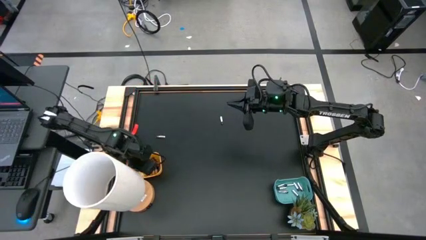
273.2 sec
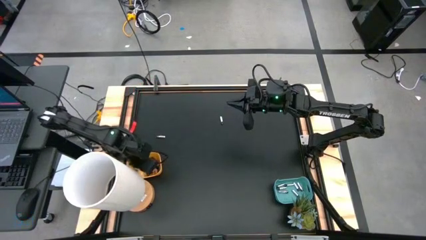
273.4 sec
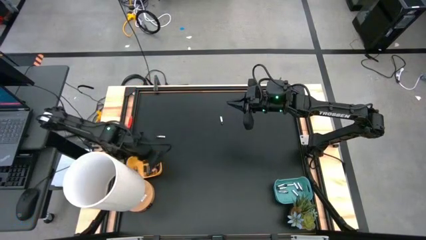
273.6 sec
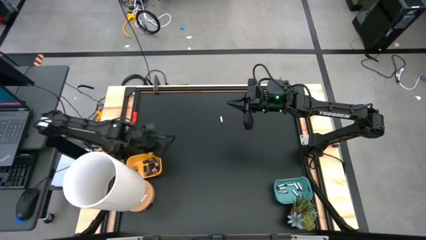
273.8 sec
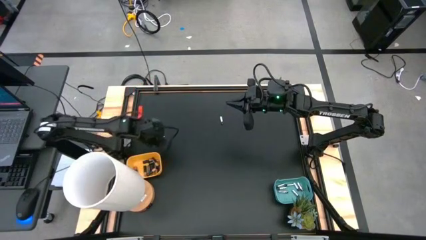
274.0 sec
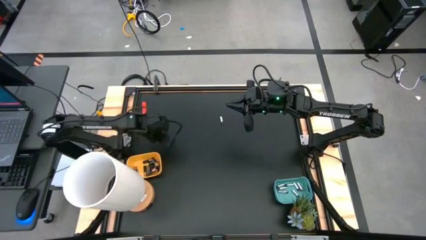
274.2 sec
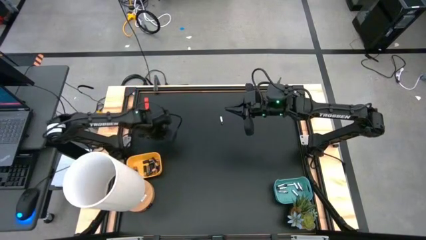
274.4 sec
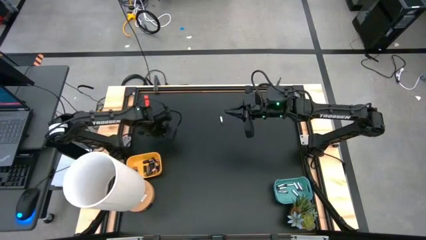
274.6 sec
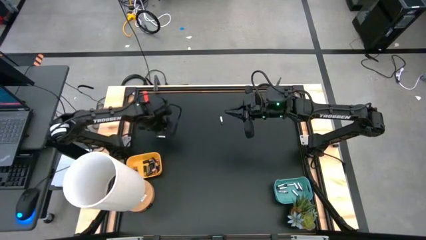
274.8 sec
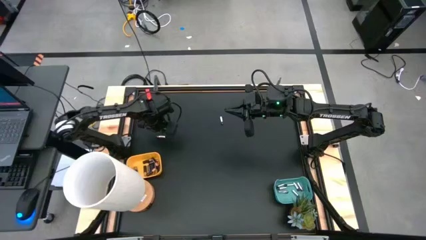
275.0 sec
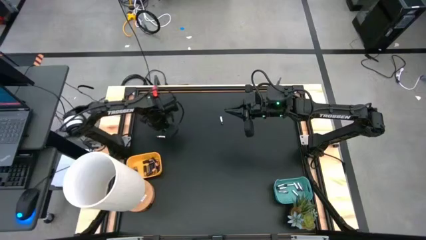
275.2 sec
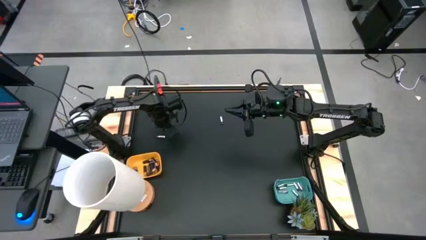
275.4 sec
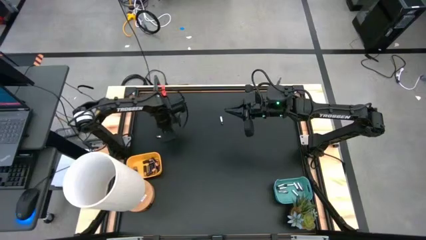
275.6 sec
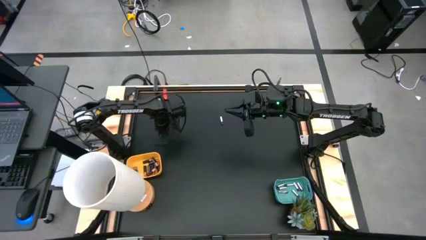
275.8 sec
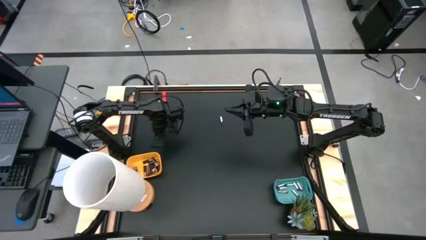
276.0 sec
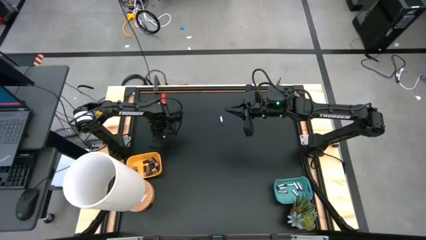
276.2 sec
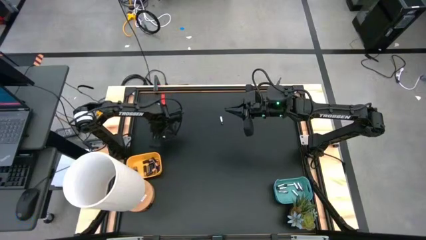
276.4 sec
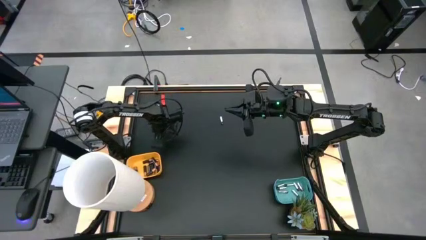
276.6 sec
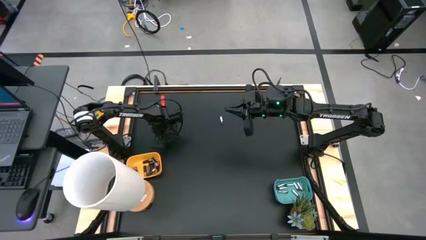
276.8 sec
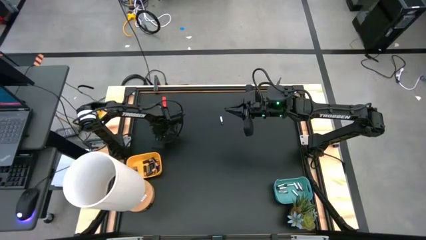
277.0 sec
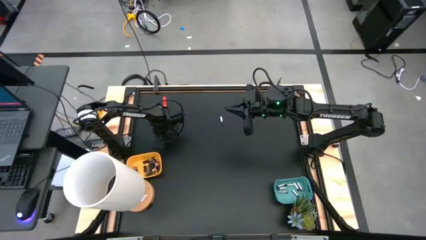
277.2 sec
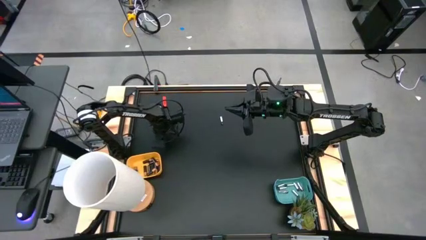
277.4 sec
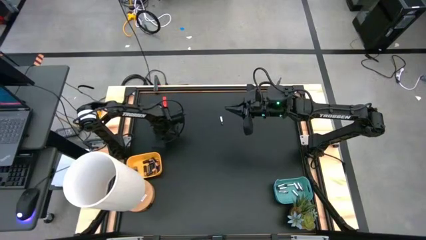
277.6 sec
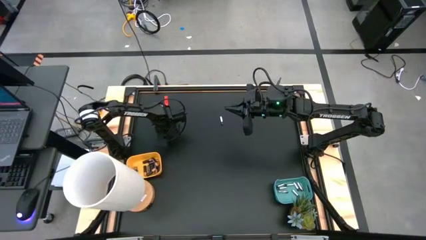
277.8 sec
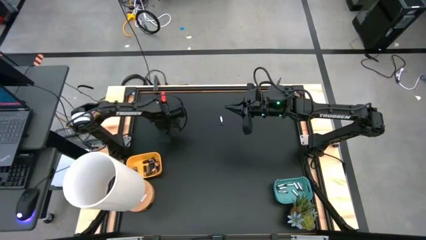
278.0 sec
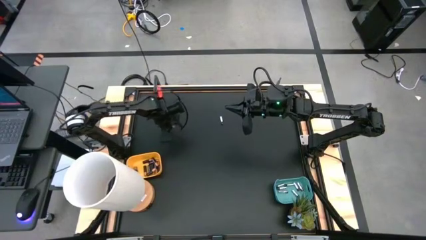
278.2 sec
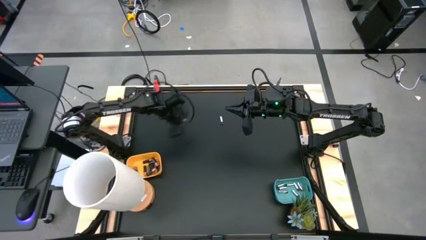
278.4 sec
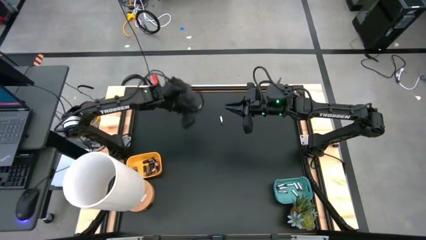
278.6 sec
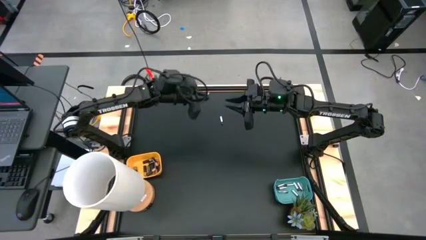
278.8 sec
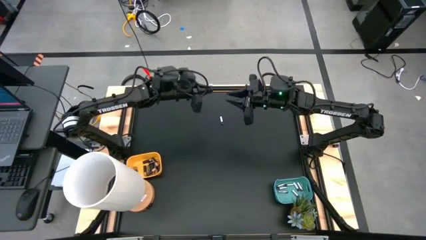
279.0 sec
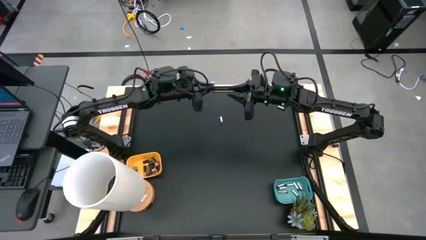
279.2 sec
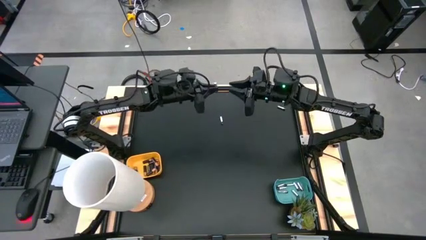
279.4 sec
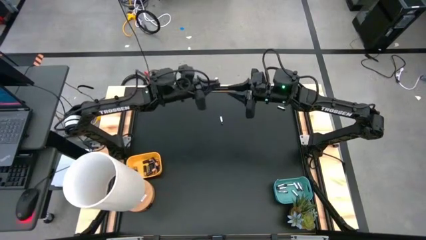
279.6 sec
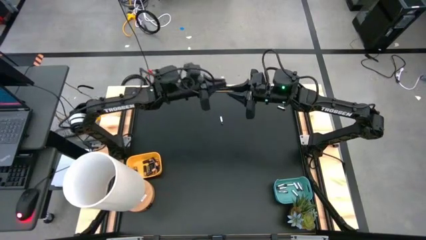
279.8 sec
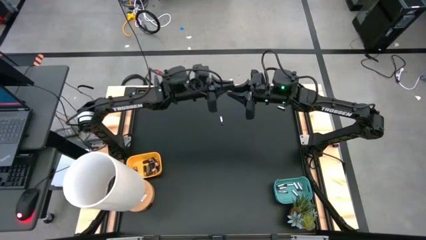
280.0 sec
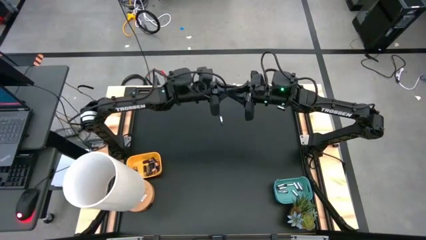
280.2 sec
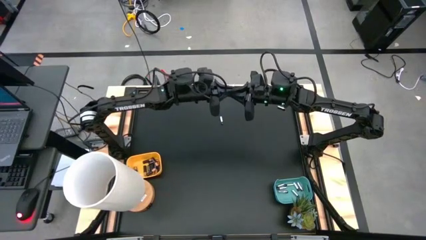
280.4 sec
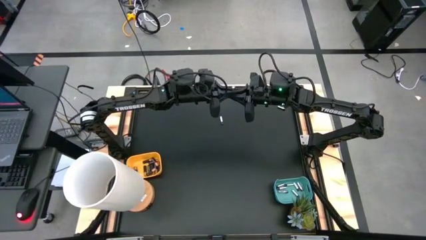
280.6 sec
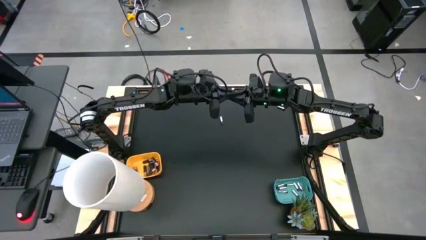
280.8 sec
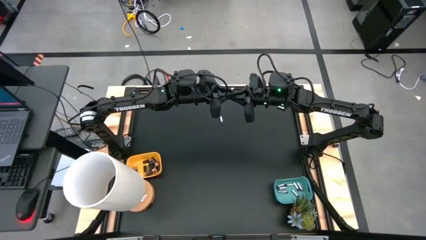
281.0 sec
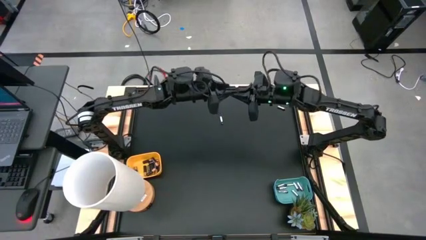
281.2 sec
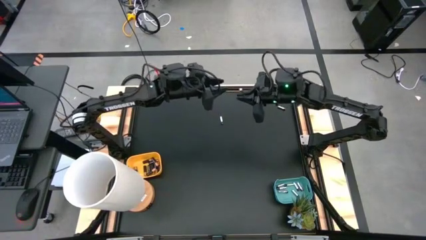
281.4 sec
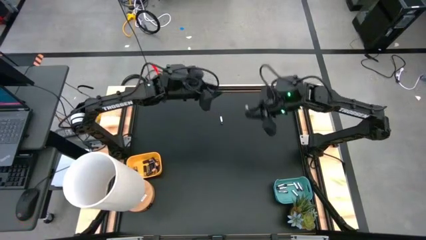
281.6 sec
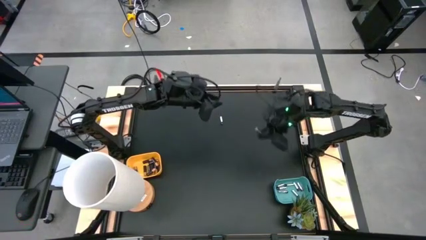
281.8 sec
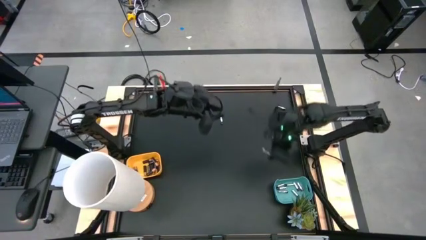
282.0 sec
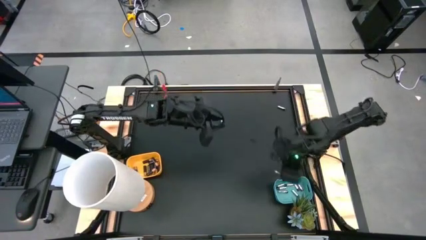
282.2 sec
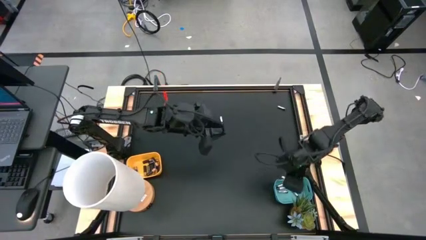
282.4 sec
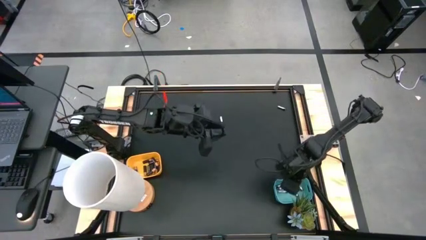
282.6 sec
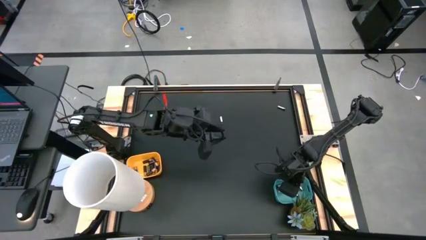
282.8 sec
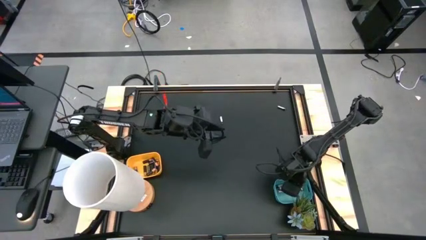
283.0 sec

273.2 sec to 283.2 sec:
Task: Sort batteries
Put the silver battery into the green bin

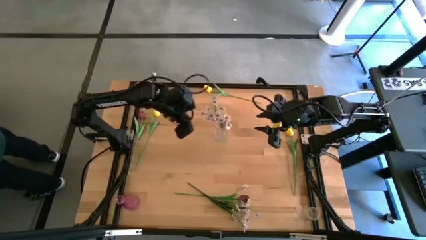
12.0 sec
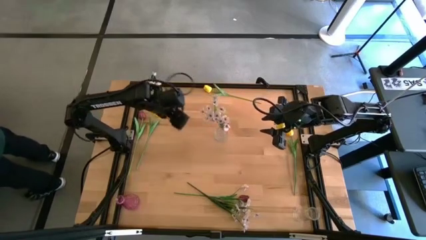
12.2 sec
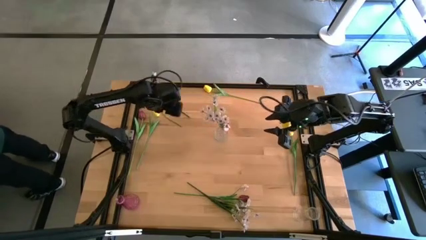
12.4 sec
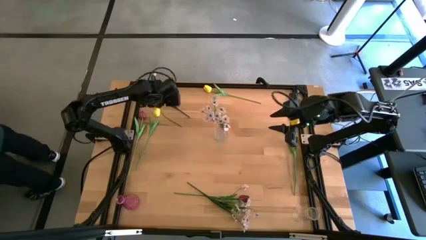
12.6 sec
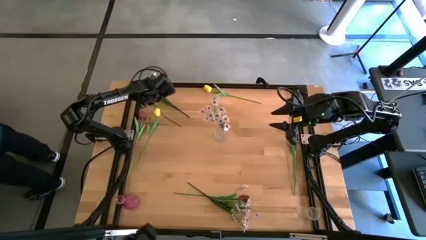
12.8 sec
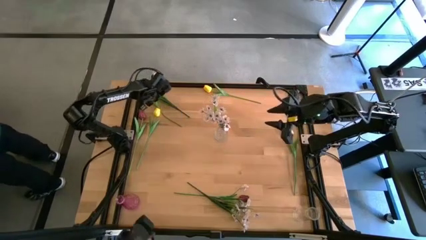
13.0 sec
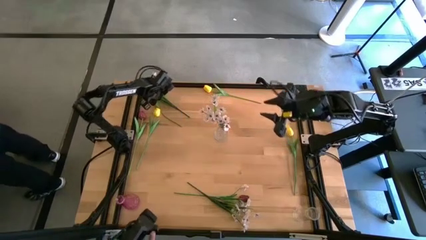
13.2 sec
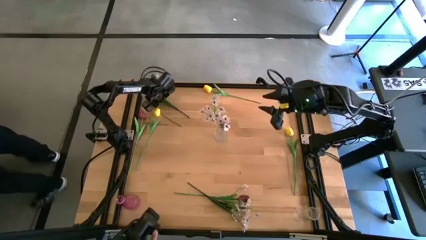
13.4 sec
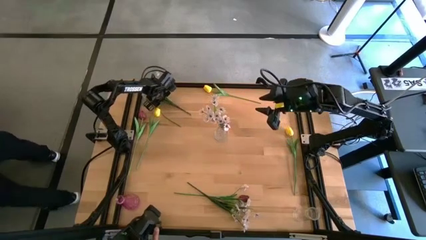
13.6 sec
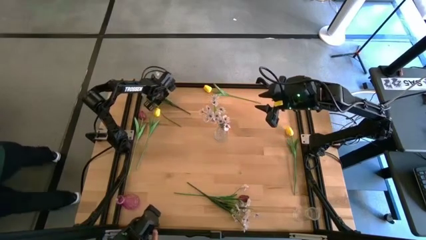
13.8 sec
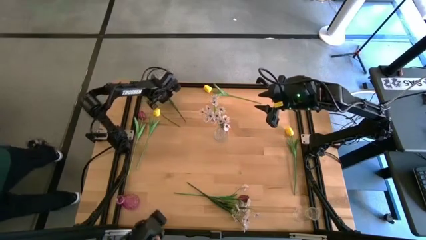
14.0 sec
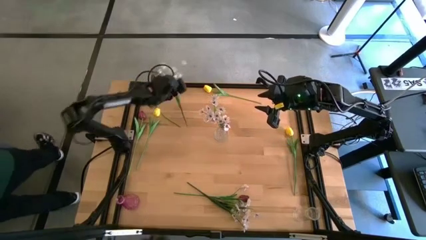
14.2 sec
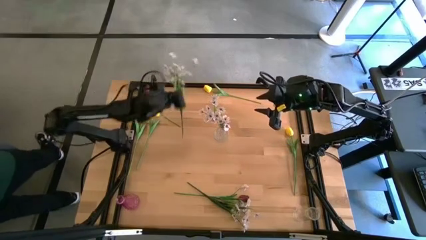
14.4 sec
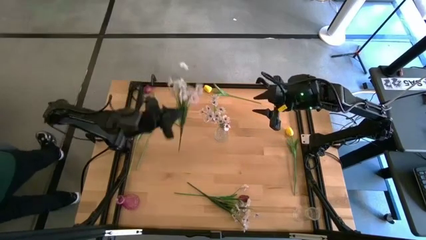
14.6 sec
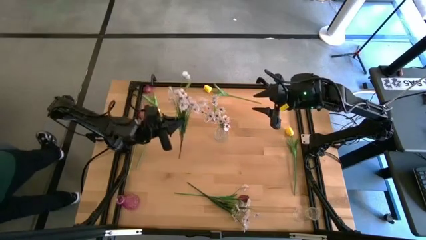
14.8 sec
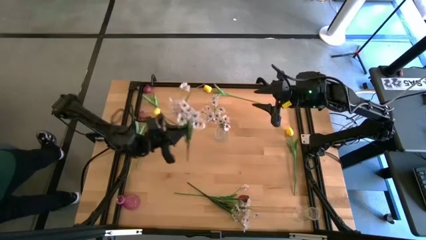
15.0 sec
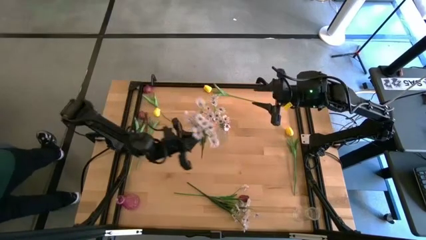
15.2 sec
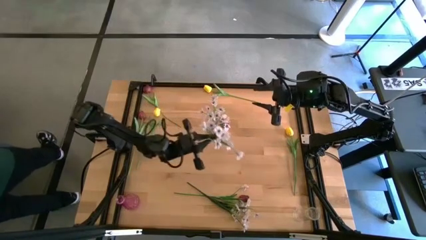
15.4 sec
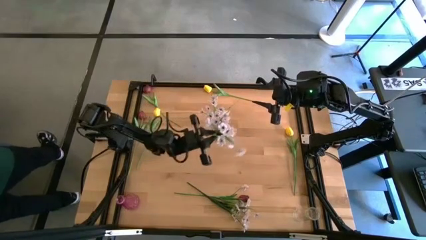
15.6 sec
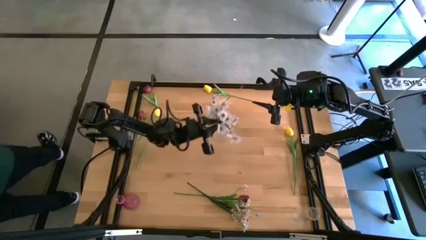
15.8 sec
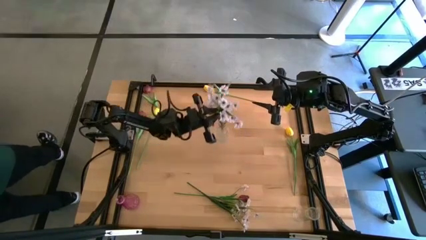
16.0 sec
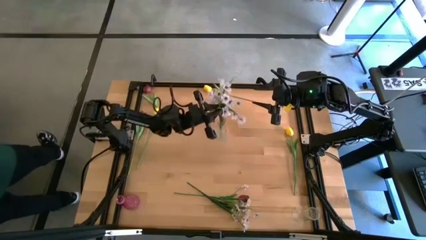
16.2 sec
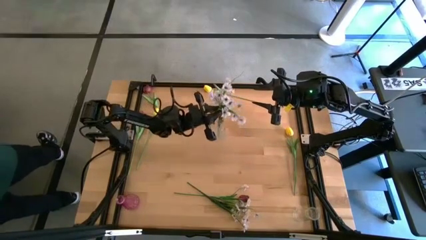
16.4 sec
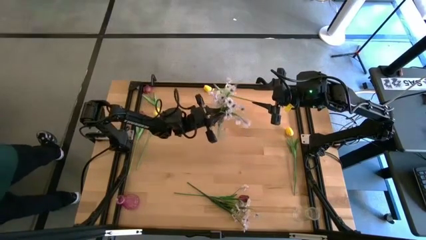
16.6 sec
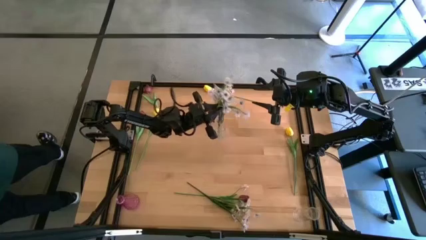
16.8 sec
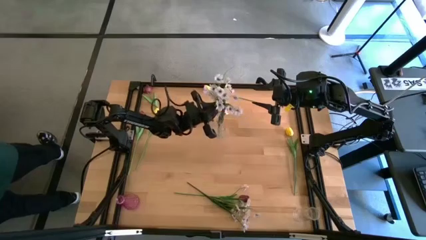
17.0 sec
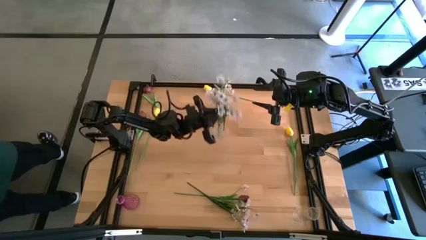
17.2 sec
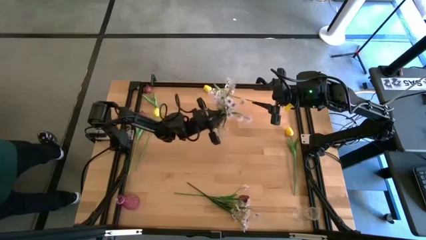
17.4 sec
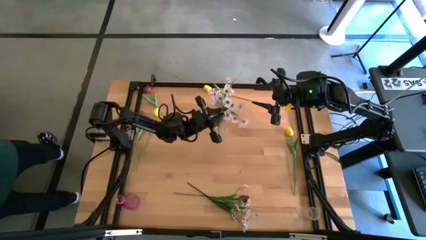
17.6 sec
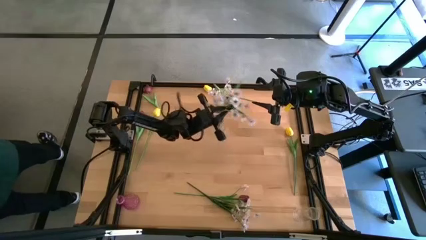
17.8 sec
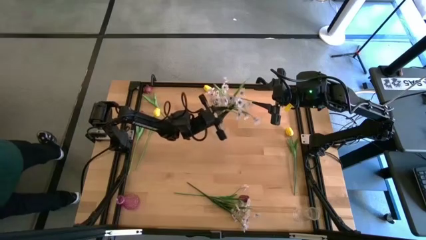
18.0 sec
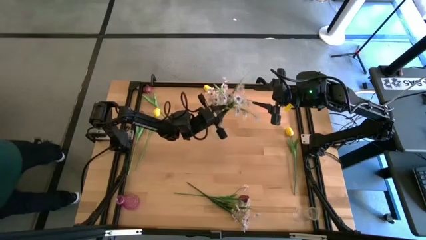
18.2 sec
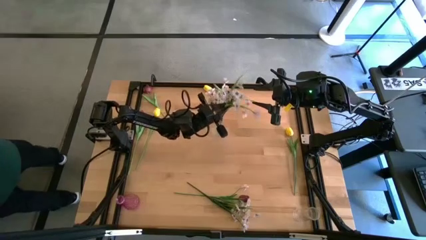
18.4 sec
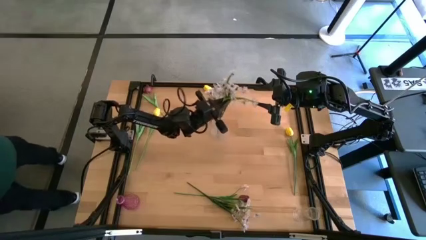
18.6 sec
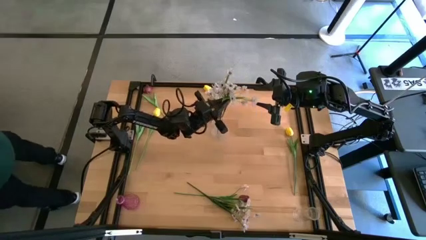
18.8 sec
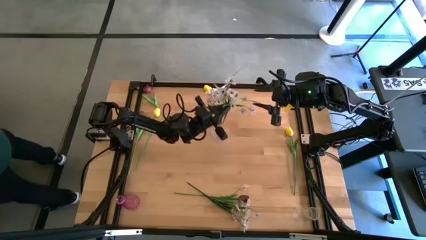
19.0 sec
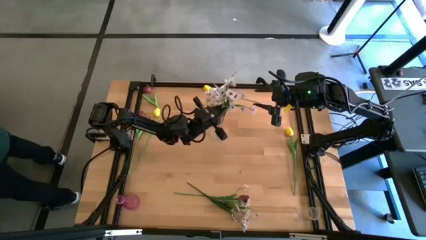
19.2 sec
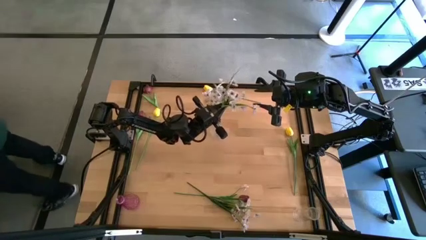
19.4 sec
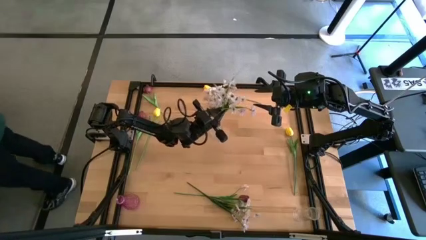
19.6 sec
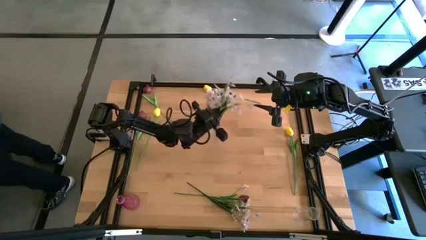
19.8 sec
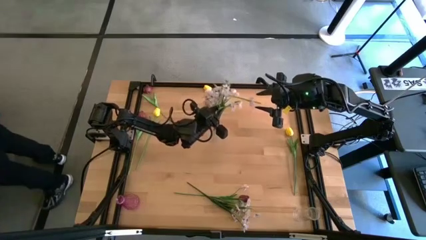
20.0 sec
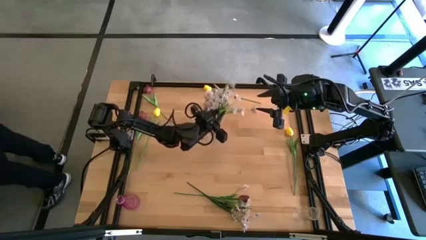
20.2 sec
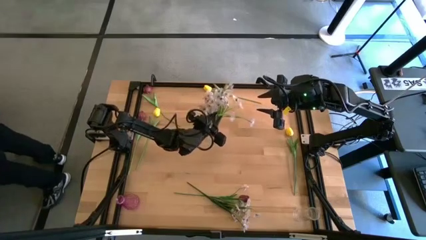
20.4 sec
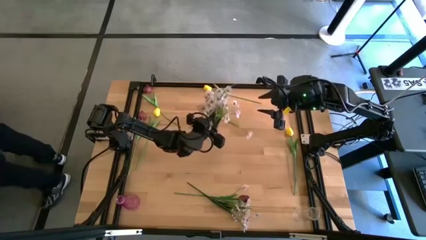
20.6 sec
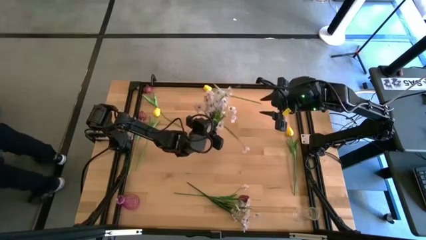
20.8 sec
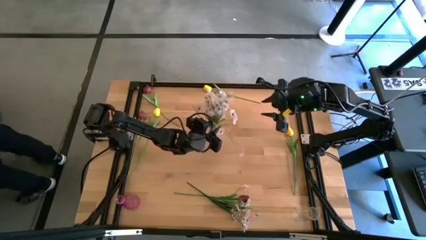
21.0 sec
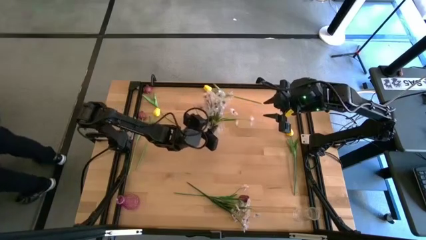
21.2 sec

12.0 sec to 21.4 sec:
Task: Sort flowers into vase by color
Put the top white flowers into the top transparent vase
